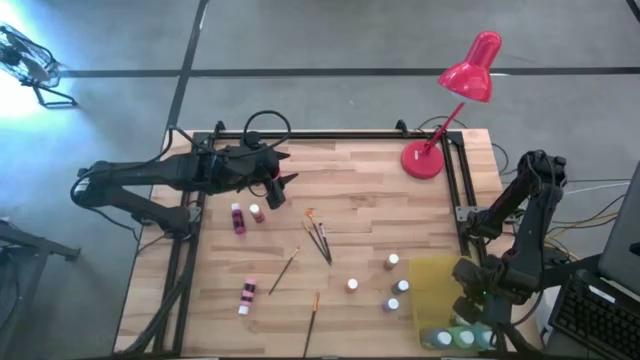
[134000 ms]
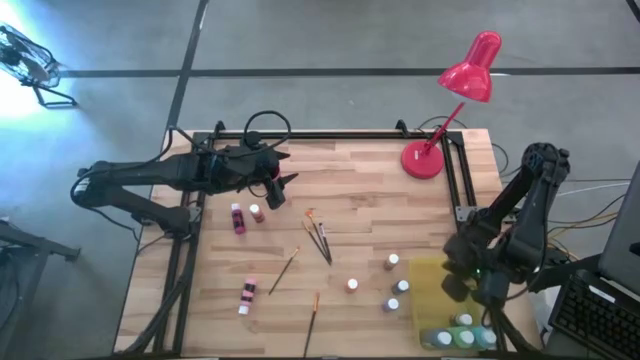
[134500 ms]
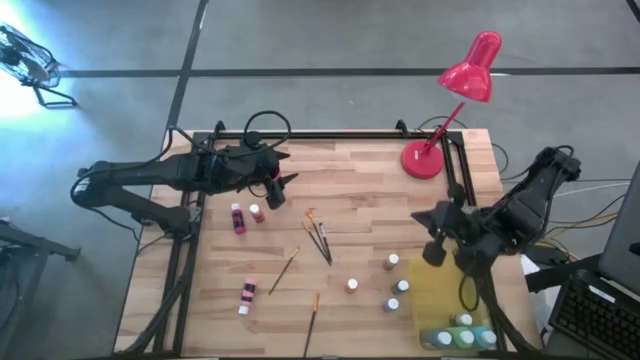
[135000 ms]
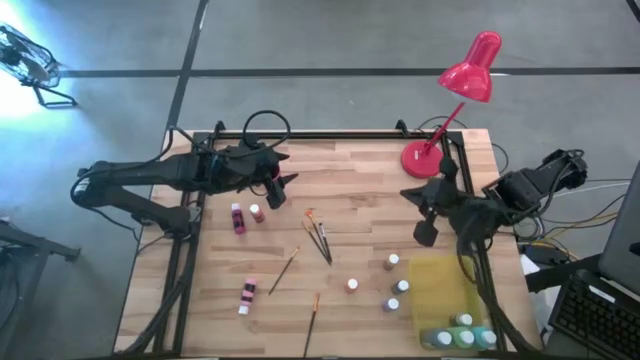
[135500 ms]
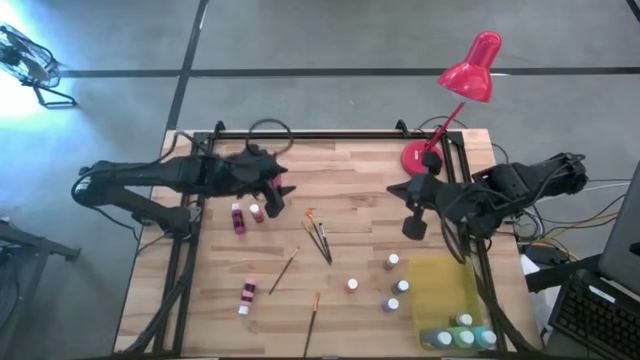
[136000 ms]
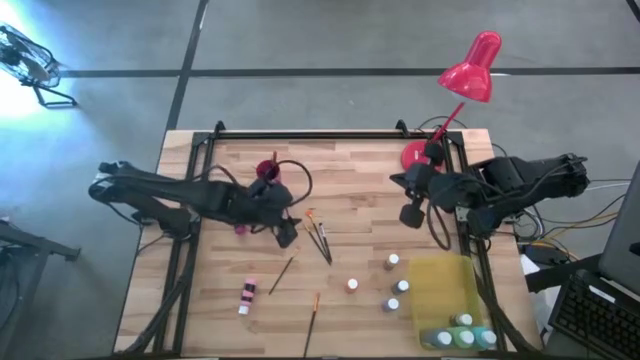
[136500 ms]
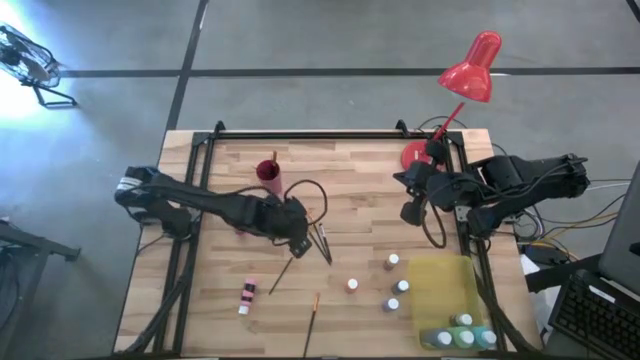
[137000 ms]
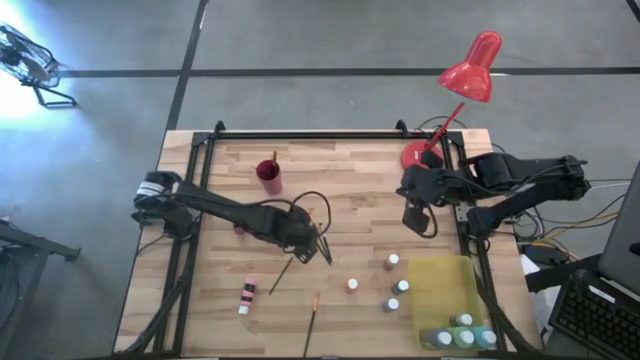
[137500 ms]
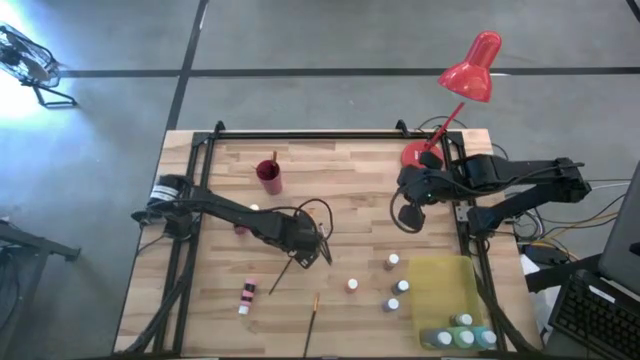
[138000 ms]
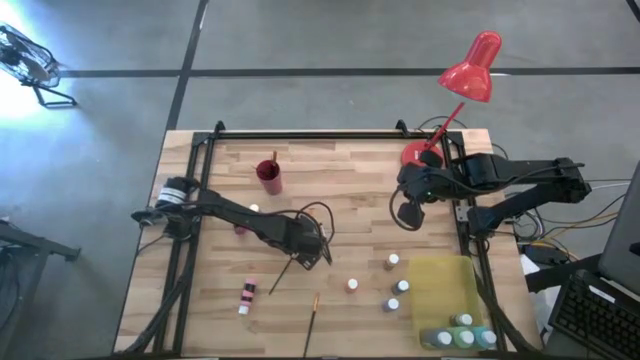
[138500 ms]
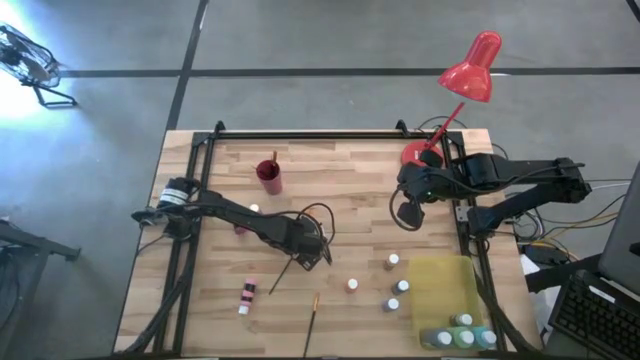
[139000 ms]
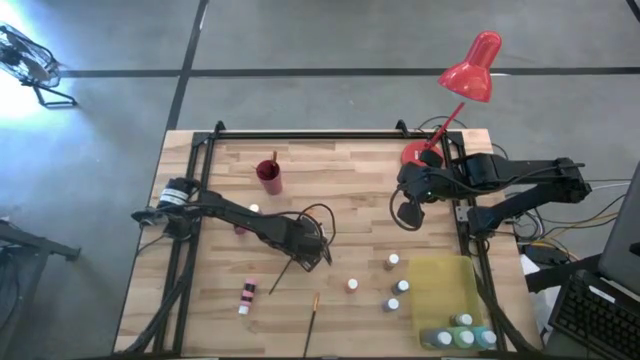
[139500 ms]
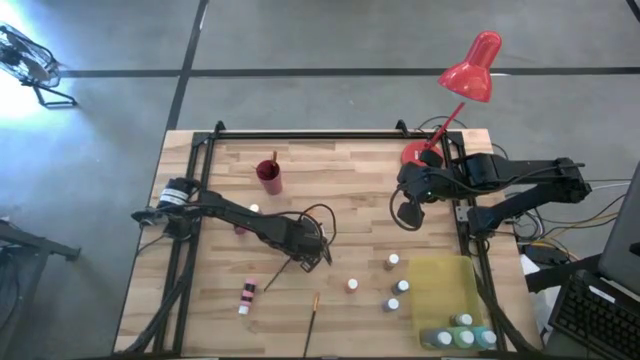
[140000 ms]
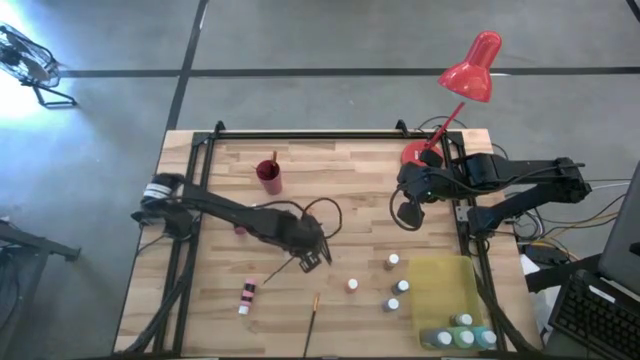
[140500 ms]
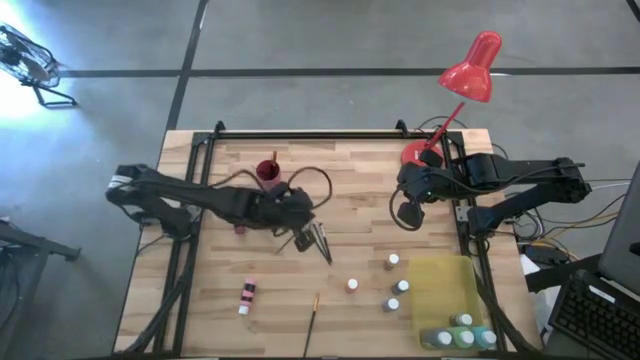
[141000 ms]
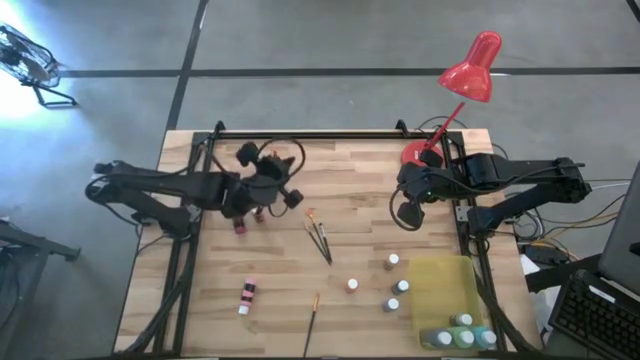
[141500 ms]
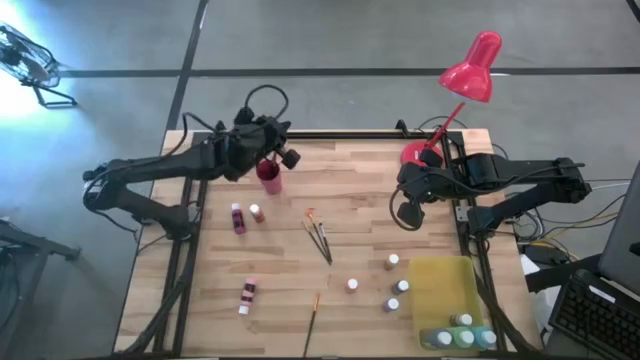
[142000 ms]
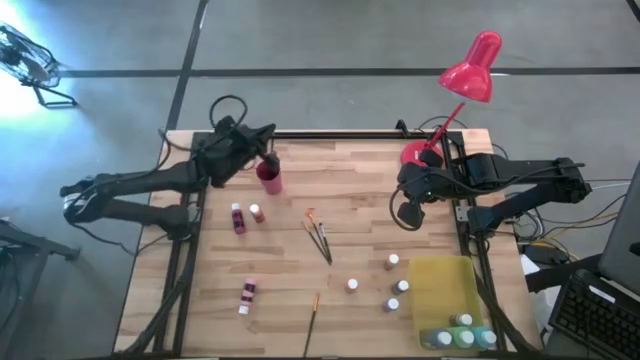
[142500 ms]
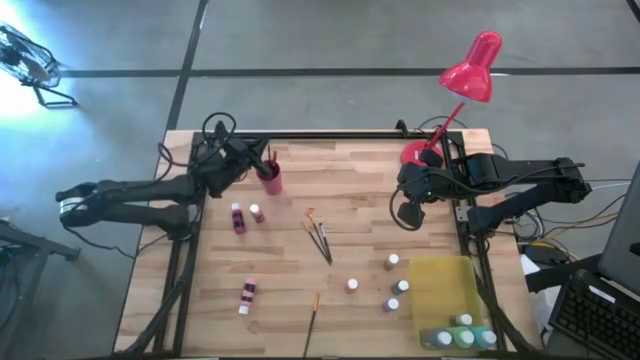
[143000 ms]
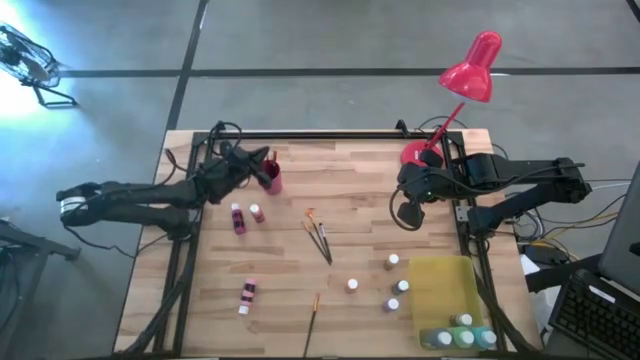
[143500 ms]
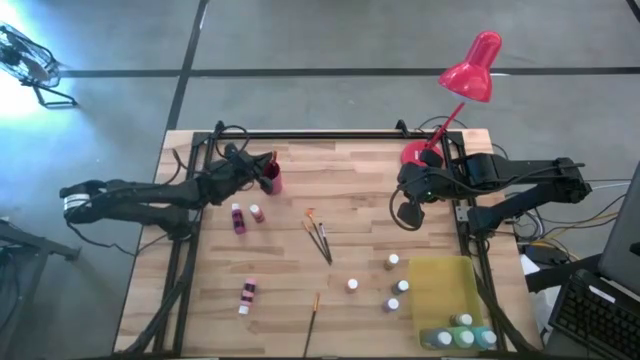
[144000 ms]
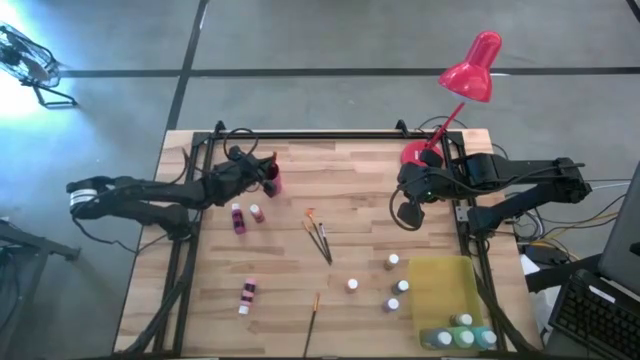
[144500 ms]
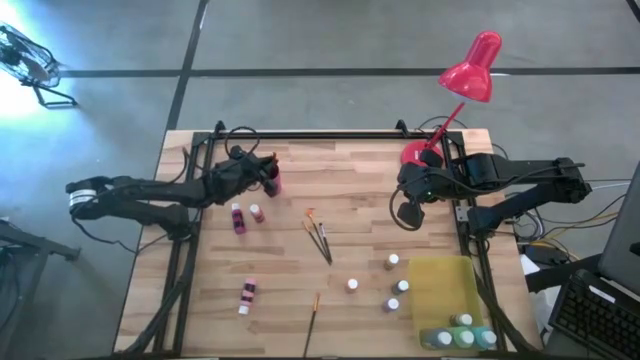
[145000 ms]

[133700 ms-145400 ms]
Task: Pick & Place Paint Supplies
Put the black paint brush into the pink cup

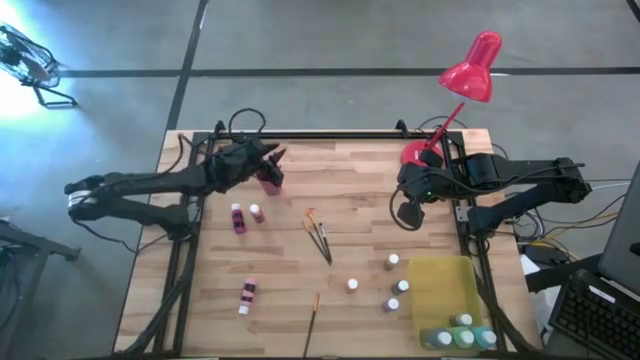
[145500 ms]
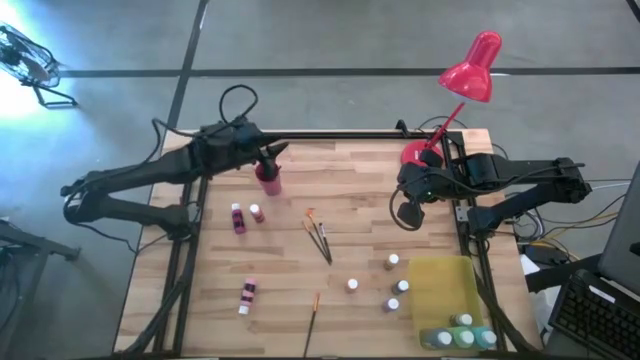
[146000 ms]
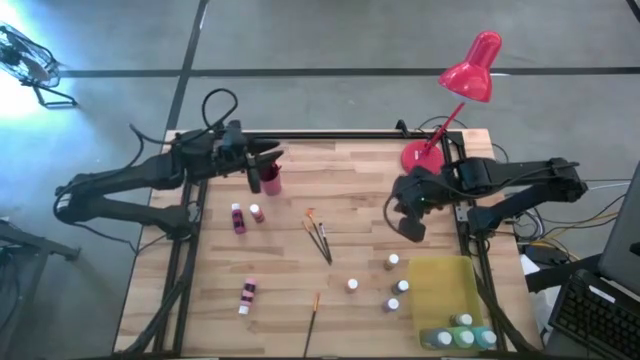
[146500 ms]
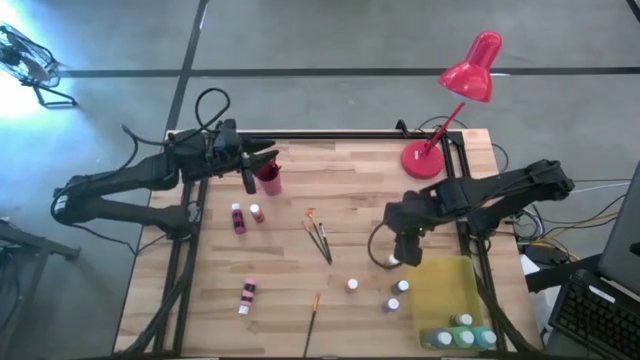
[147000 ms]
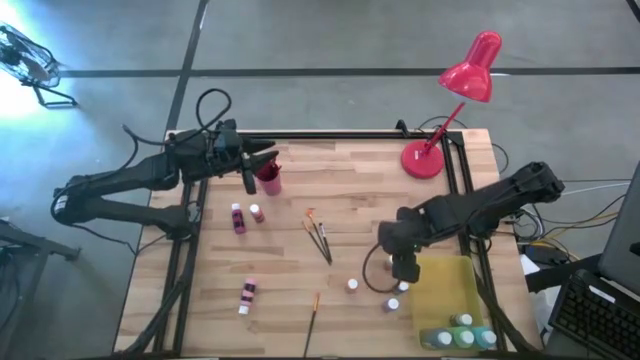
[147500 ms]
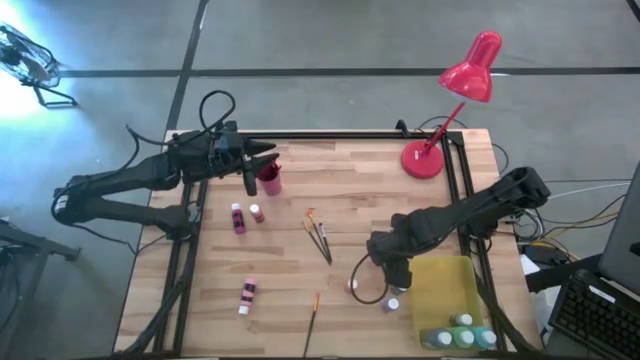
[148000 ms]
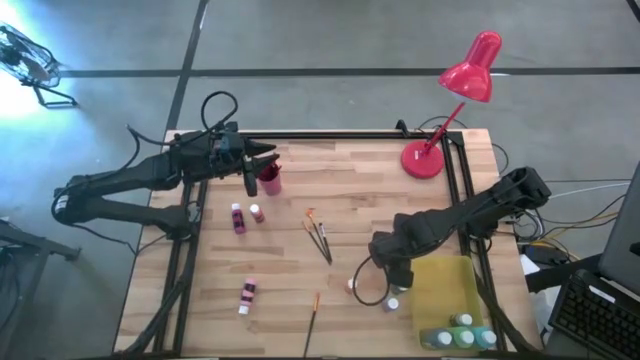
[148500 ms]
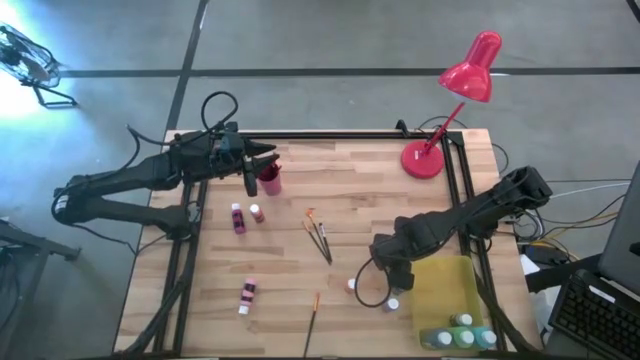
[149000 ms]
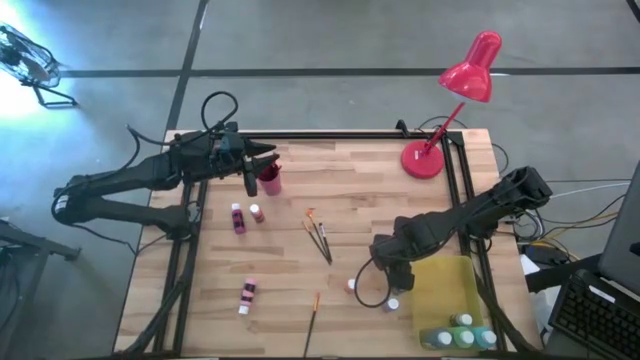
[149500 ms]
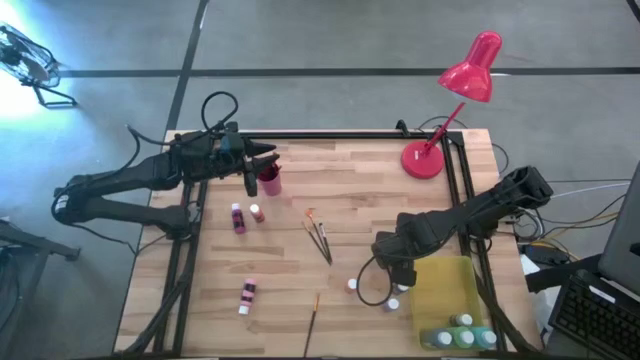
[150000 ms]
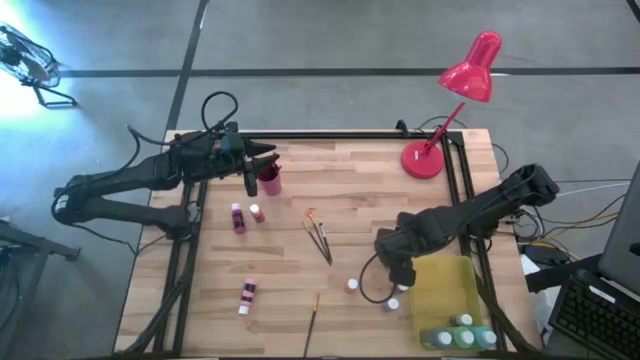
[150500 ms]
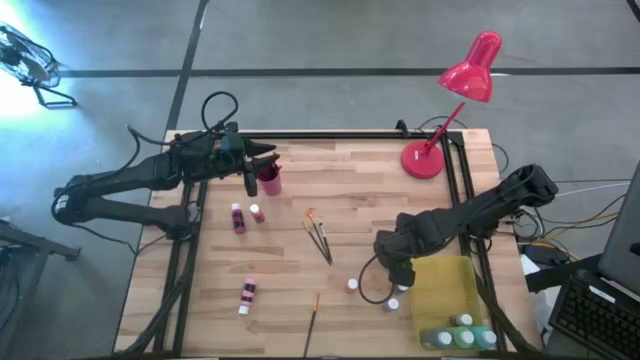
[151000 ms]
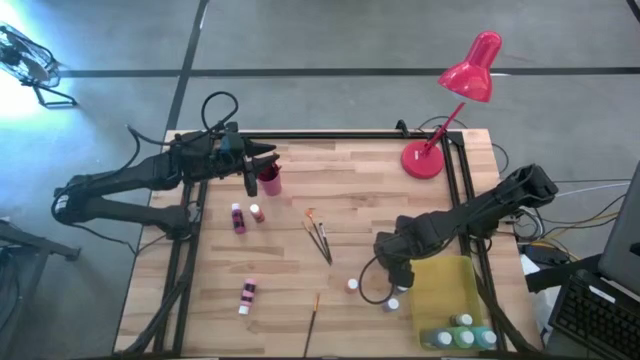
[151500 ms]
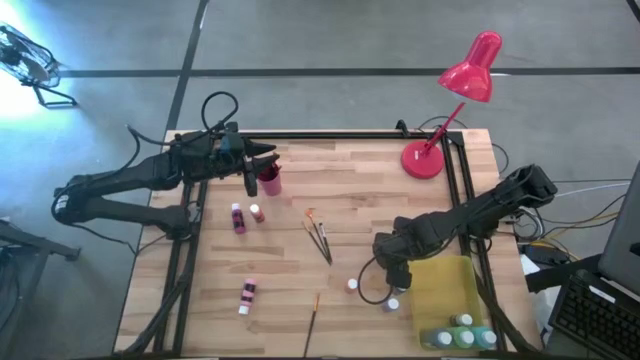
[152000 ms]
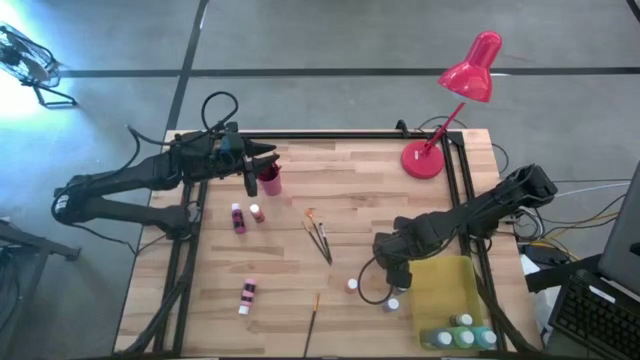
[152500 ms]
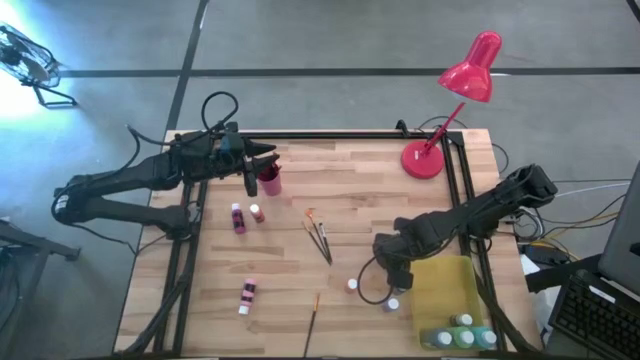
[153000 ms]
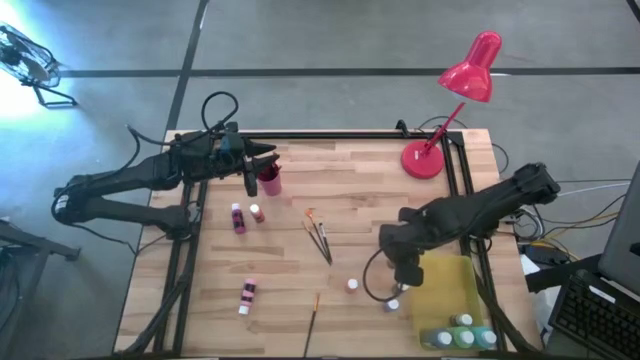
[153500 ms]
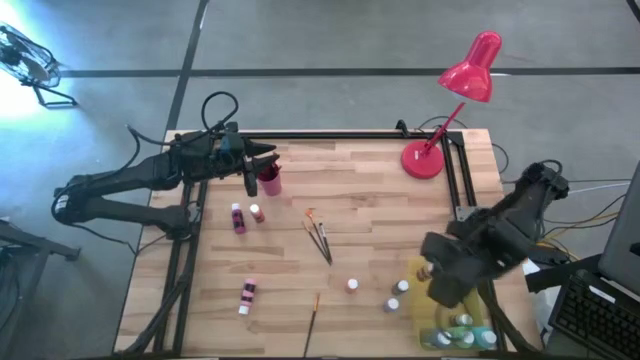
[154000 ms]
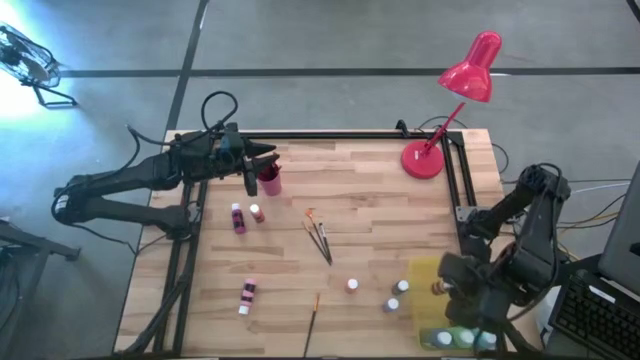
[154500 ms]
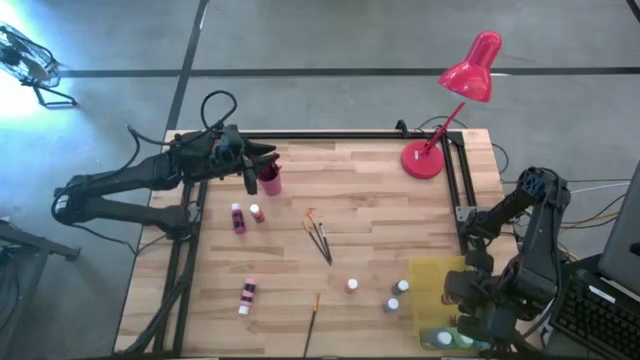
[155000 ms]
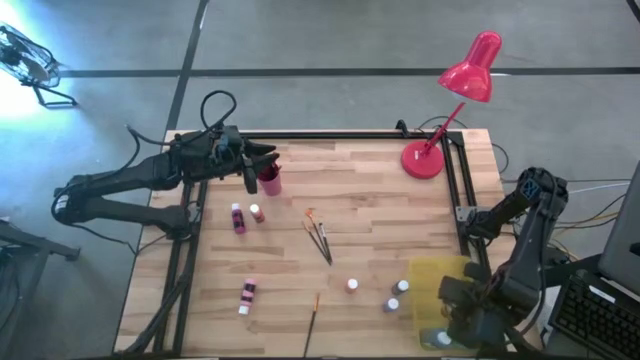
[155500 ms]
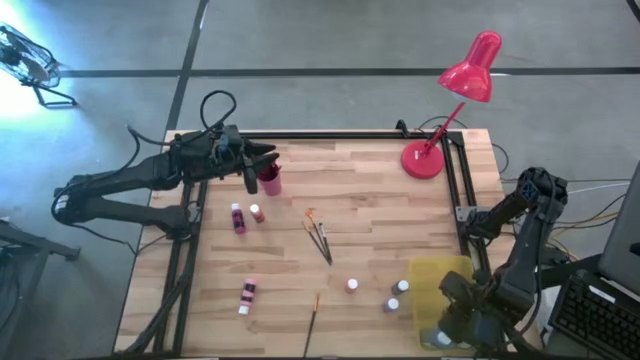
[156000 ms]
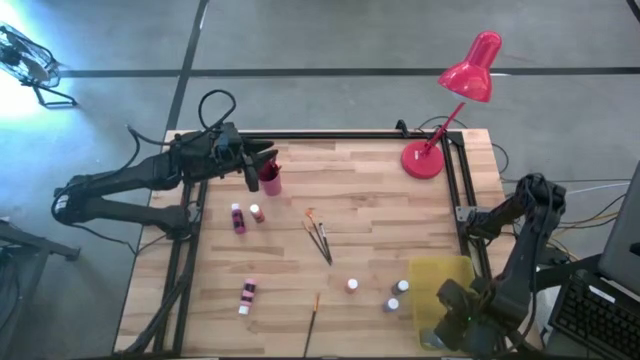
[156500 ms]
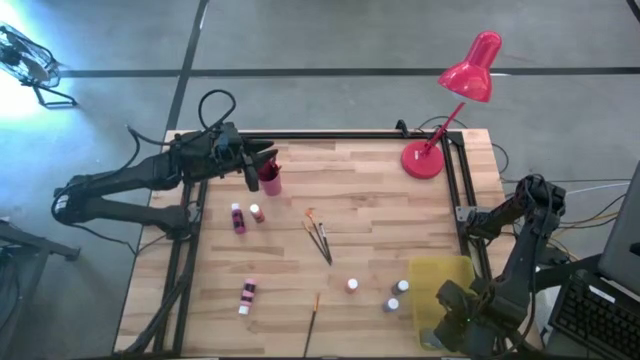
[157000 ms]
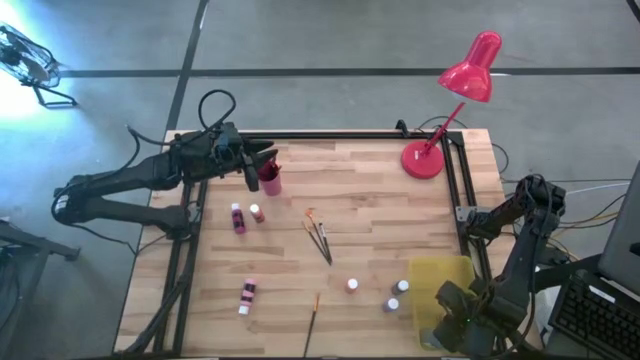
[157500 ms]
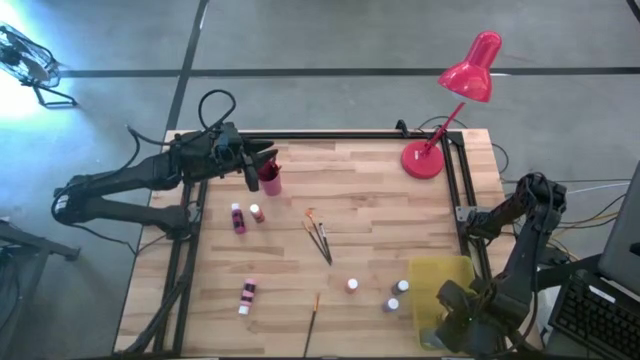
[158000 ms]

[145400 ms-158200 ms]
Put the yellow paint bottle into the yellow bin
